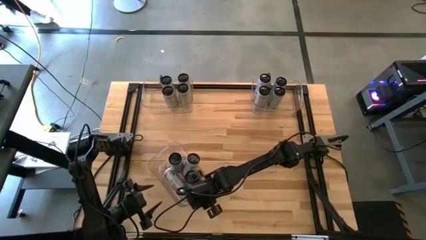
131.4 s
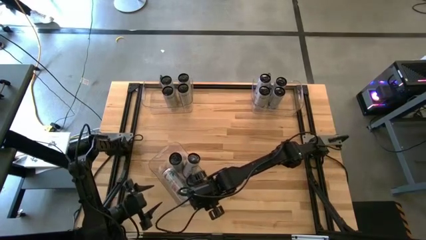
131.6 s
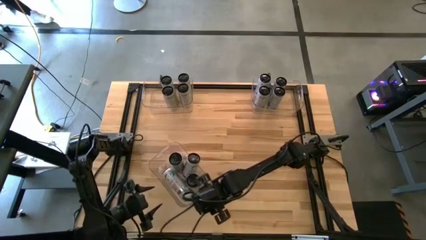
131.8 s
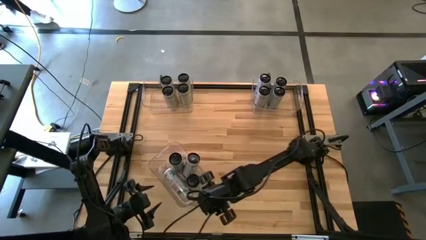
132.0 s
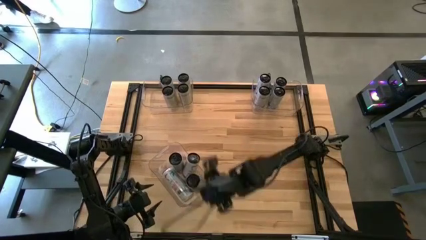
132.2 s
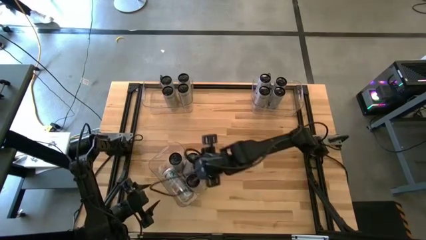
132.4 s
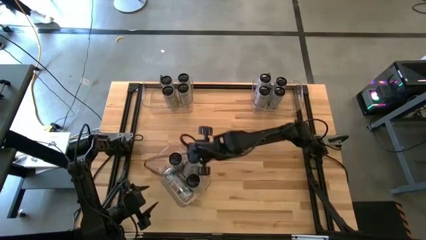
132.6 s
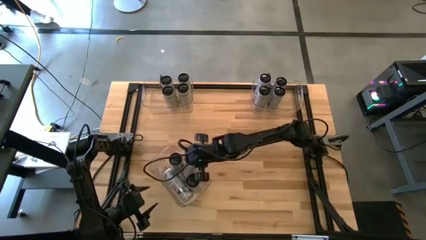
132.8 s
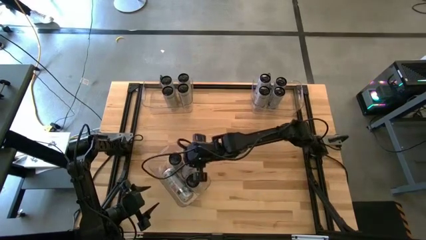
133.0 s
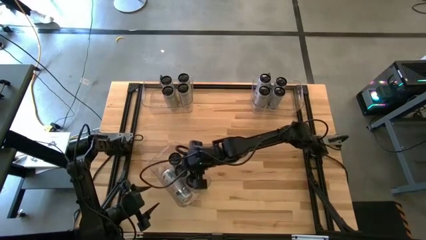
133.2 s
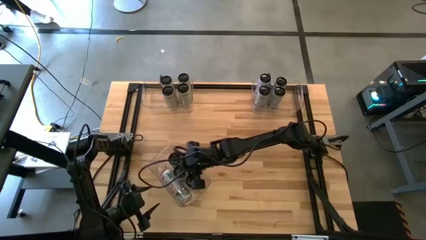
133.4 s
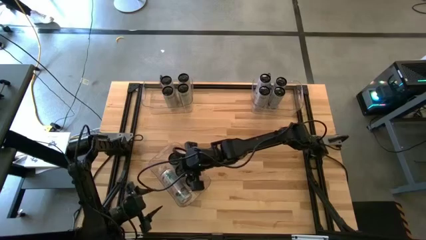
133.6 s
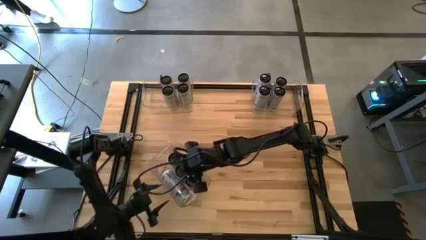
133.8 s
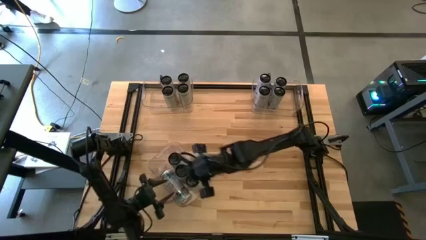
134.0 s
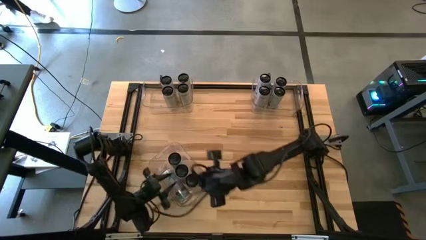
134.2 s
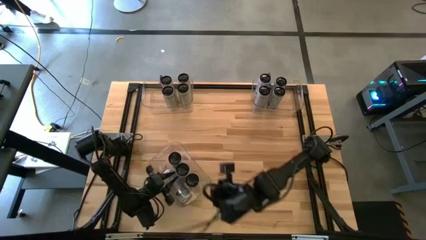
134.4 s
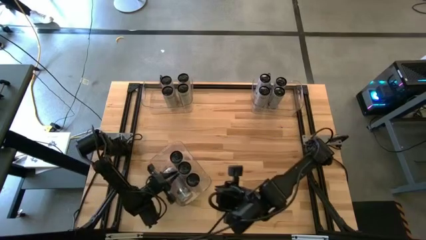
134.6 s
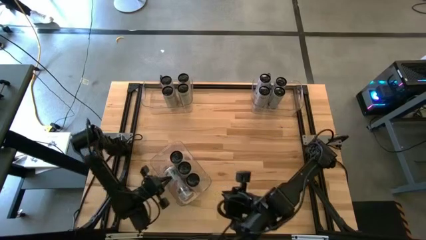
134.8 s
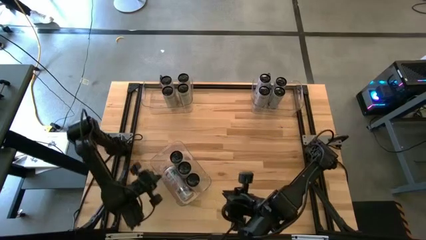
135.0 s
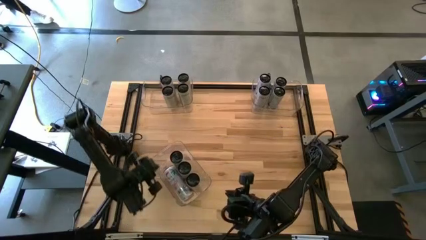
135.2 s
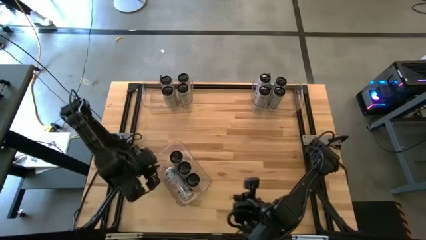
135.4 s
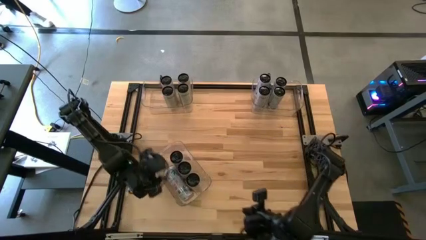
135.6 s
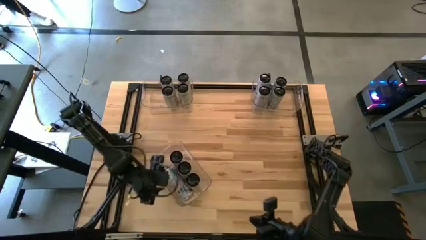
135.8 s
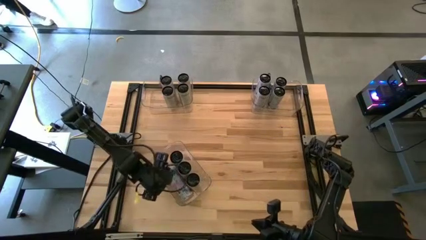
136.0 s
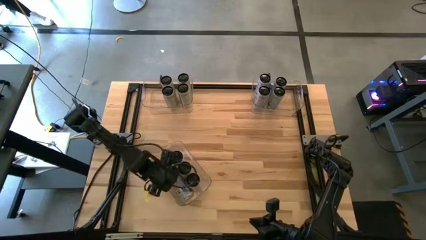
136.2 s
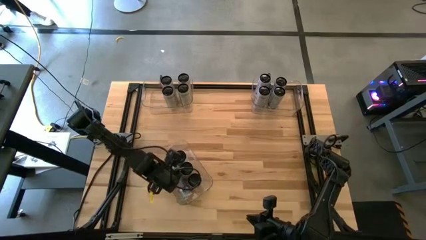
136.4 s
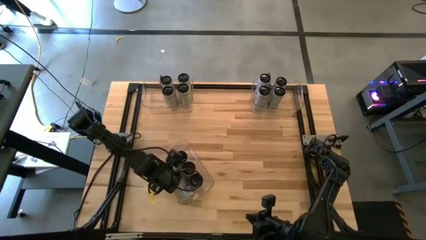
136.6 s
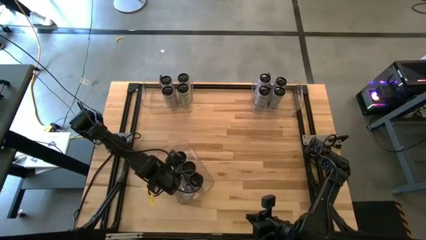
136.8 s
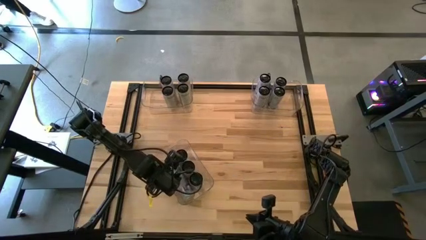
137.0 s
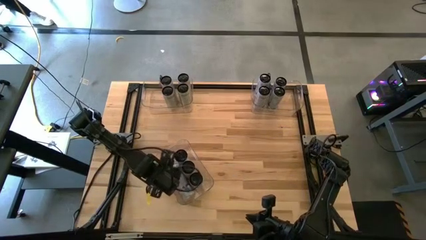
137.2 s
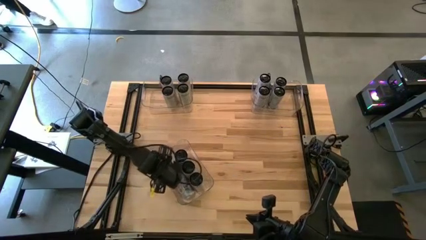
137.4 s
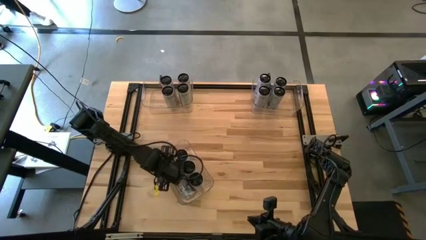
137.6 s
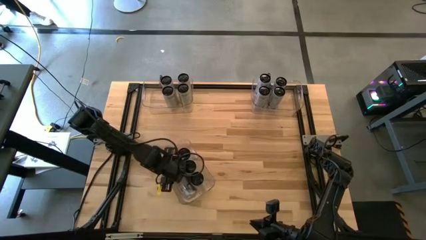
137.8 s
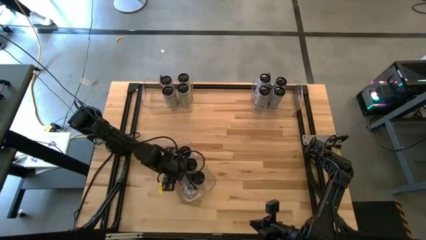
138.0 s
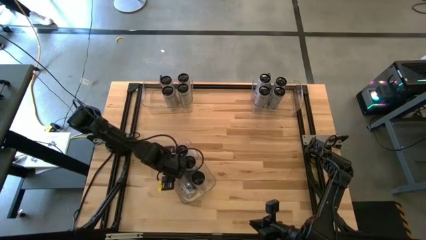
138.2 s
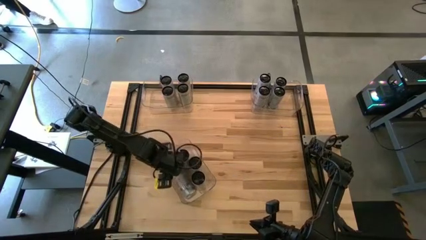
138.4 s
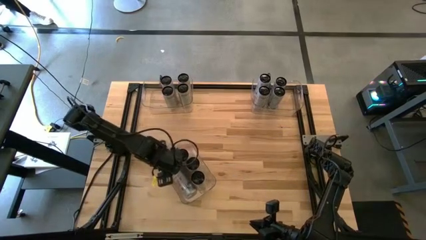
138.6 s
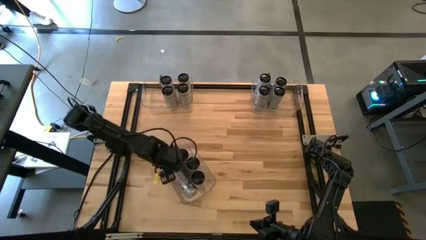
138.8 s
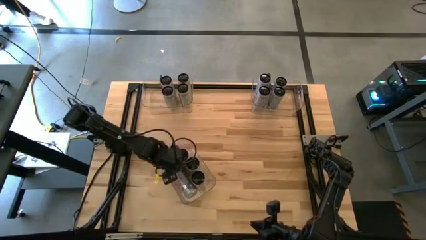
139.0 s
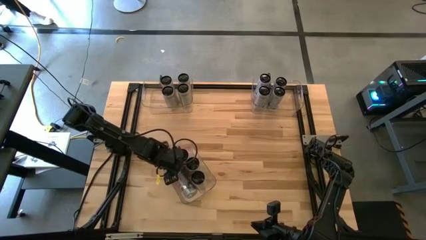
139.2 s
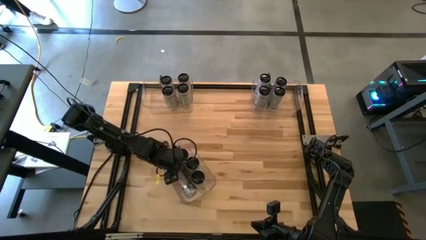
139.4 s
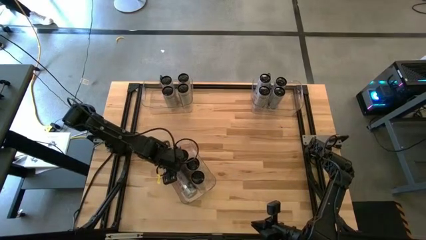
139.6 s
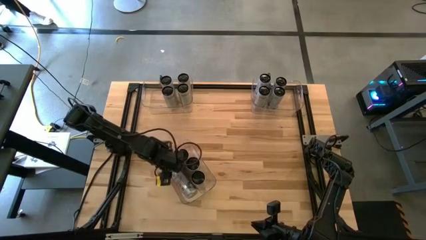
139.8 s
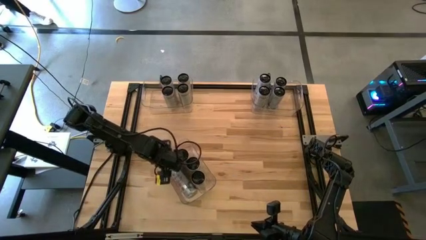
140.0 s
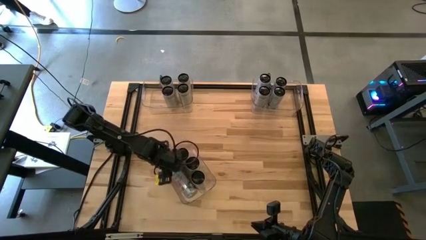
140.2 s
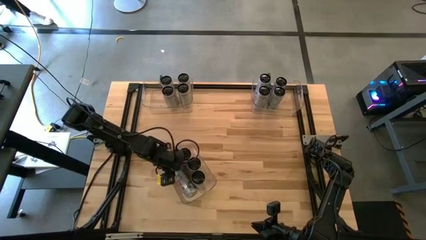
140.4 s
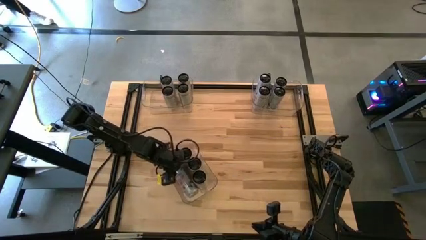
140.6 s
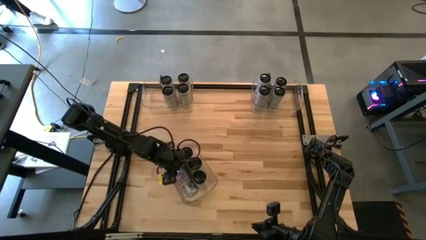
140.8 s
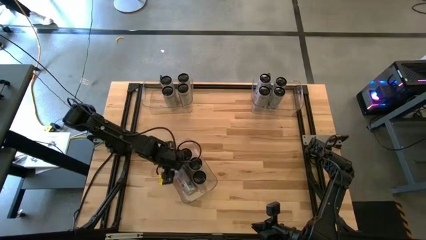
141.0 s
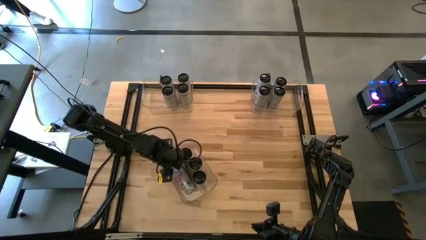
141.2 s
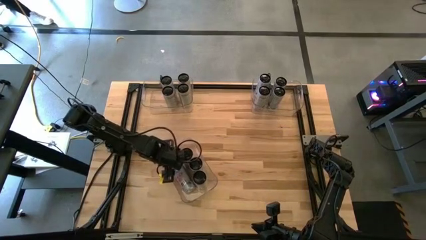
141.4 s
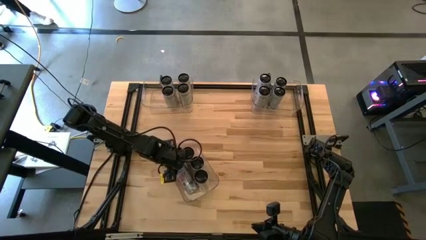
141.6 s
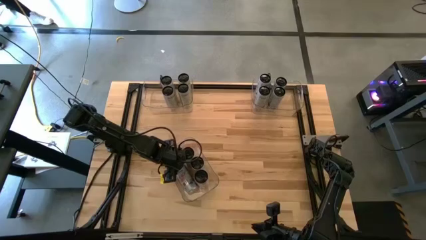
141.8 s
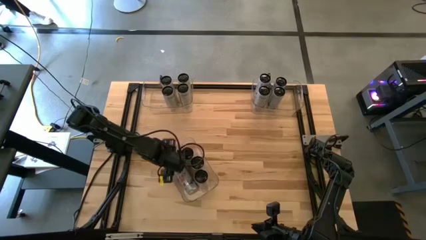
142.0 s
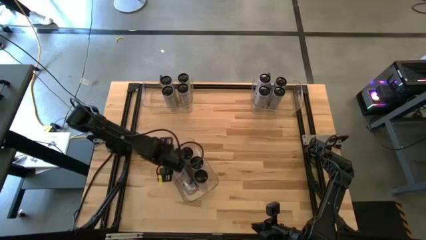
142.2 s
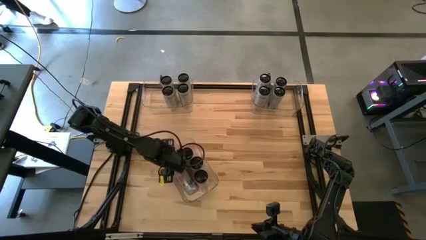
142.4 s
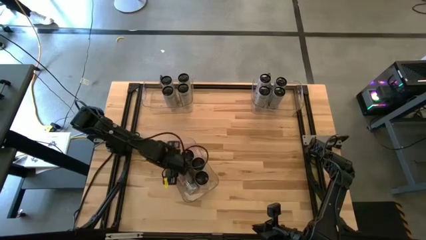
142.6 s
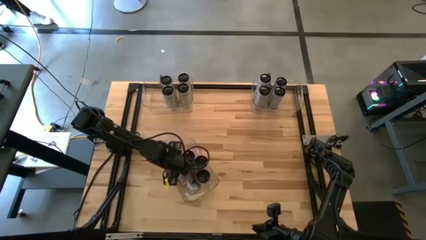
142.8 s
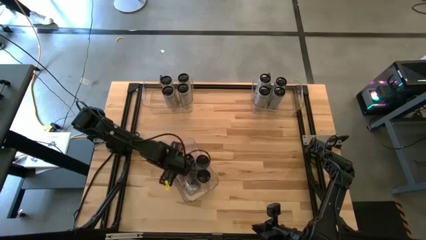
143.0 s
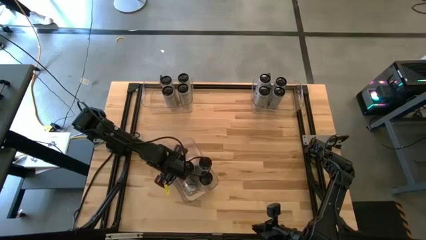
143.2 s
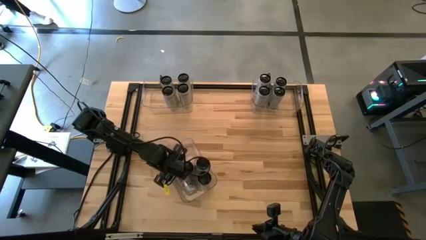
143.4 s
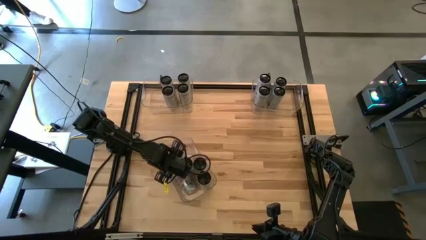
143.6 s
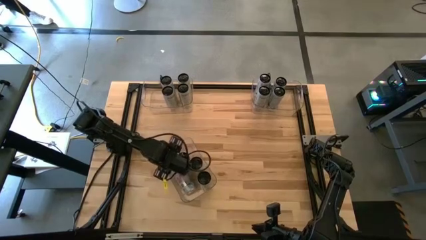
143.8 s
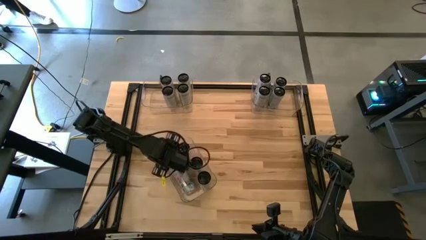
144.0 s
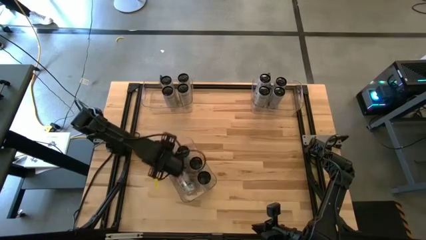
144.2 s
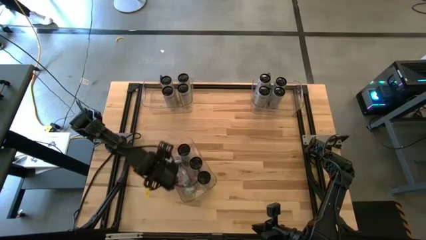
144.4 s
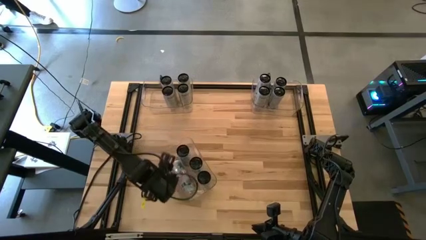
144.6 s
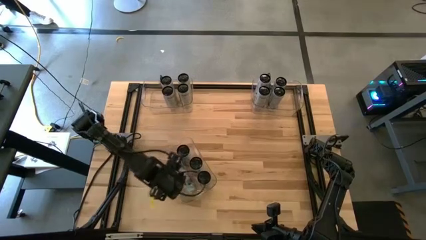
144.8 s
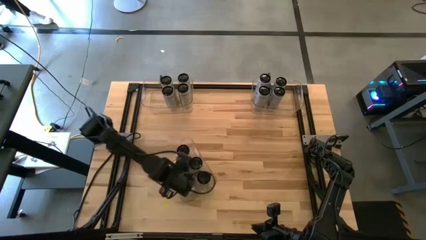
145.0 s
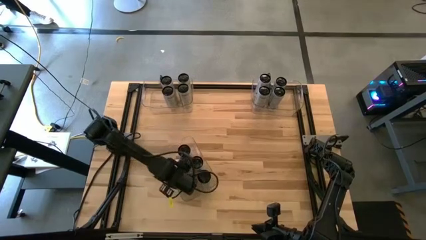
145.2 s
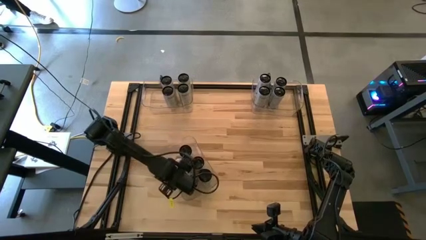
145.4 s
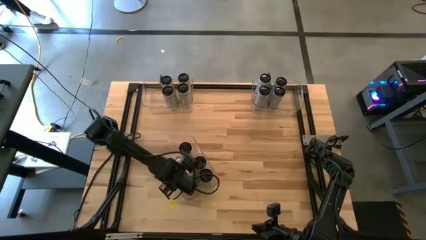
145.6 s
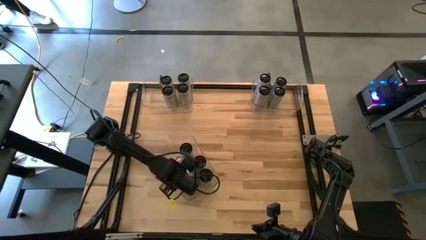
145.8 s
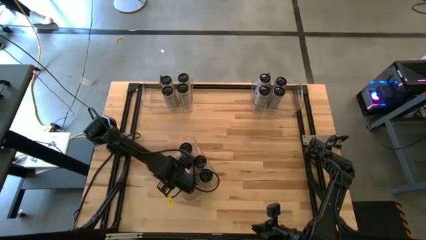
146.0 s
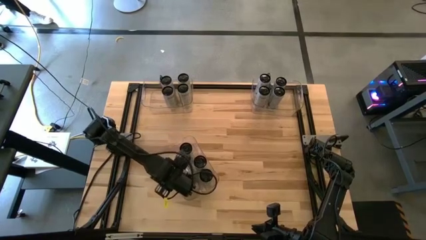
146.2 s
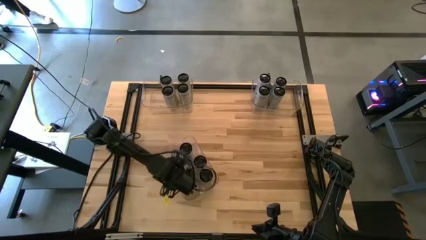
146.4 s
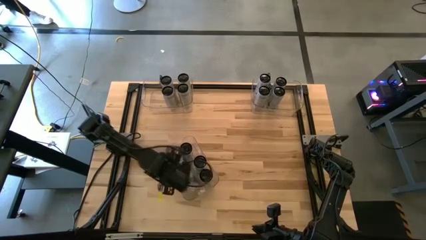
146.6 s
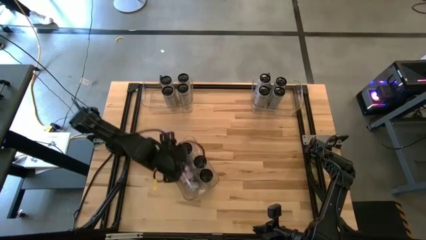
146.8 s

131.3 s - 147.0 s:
Task: Sort soda cans
Adjust all the white-pink soda cans into the center transparent bin

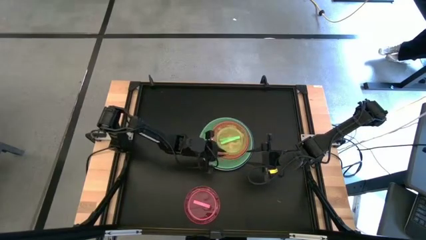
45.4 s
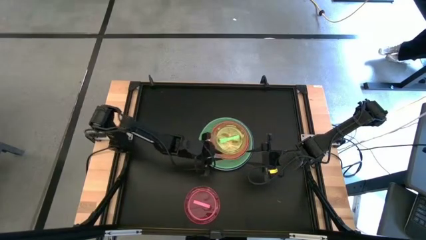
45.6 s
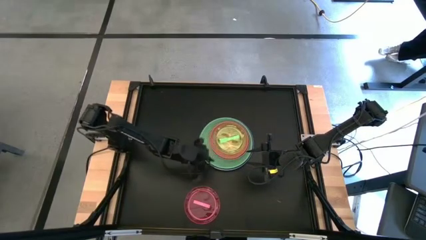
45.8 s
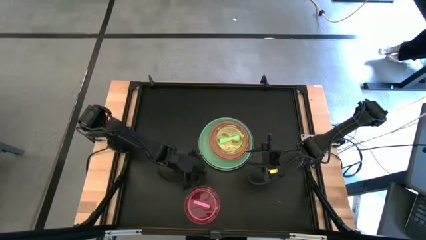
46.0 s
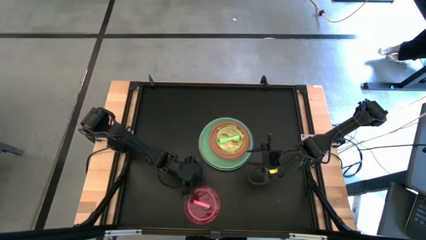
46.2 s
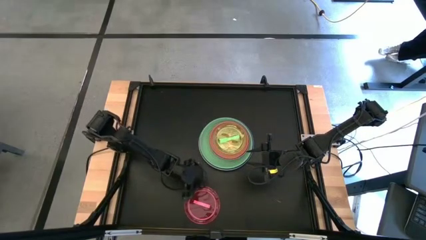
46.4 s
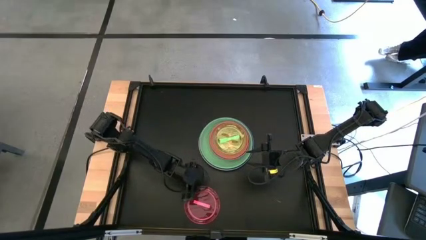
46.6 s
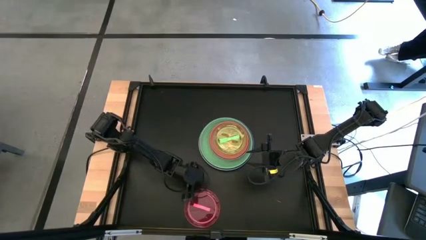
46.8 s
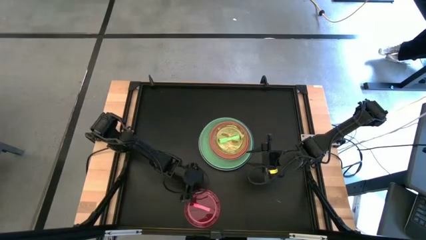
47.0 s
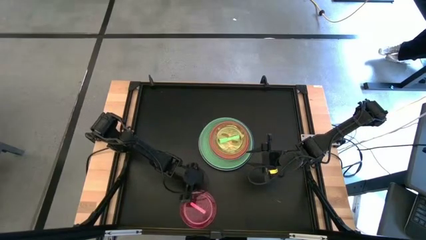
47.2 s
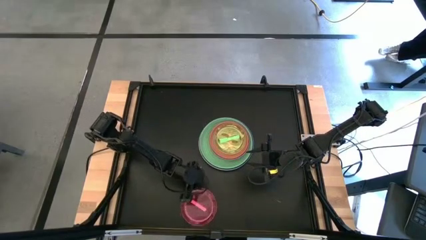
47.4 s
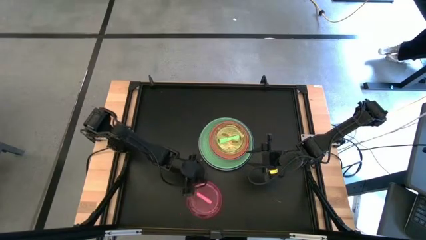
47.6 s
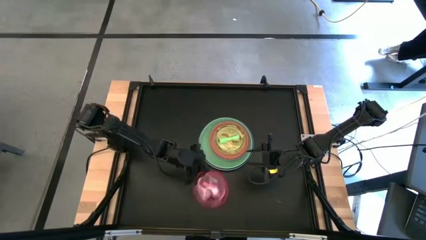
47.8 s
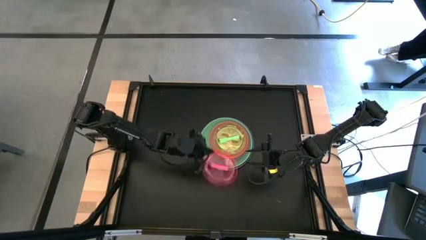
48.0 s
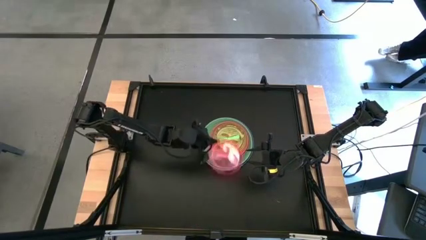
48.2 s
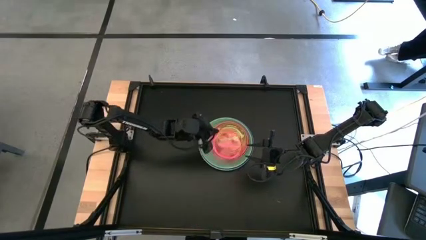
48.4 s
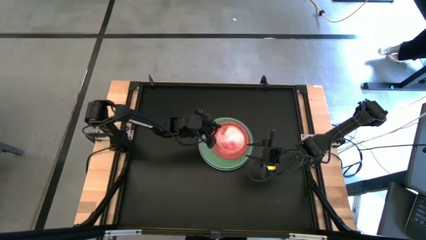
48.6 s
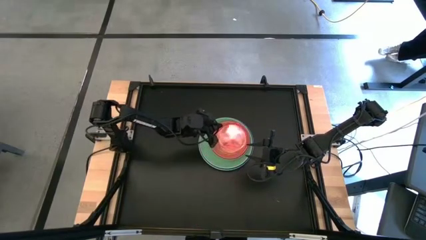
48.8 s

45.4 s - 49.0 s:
Task: Stack plastic plates
Stack the small red plate on the small green plate
